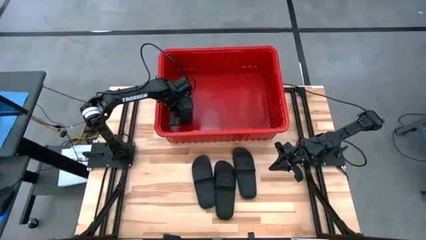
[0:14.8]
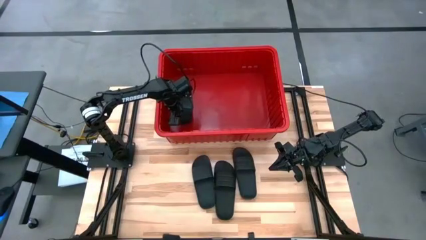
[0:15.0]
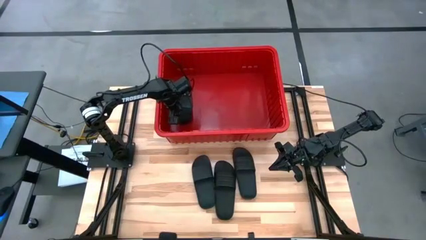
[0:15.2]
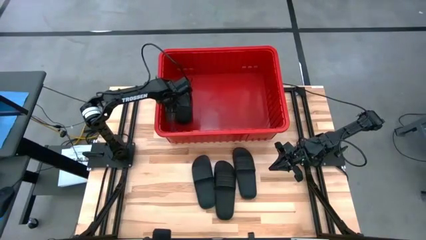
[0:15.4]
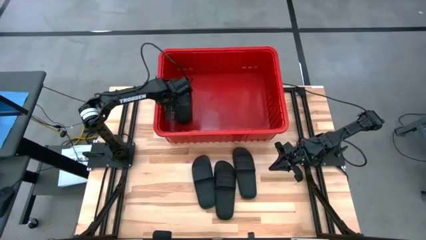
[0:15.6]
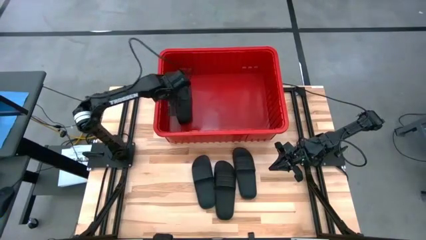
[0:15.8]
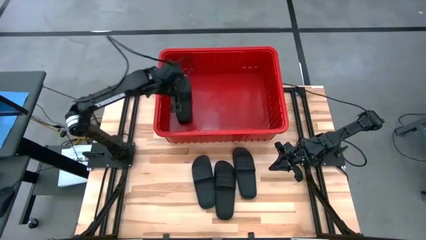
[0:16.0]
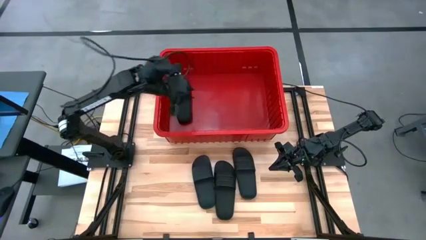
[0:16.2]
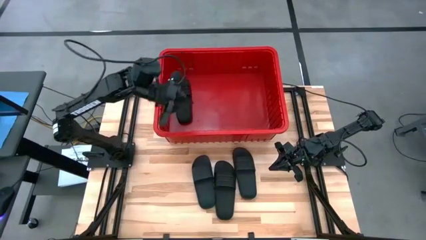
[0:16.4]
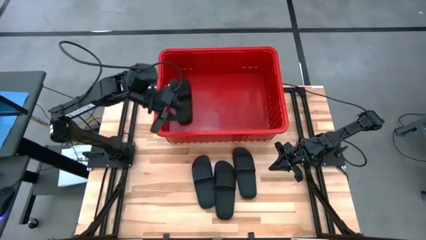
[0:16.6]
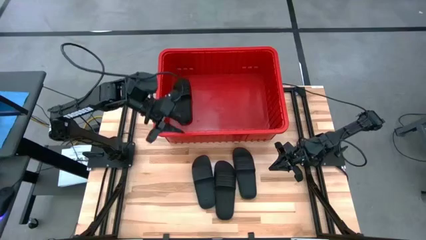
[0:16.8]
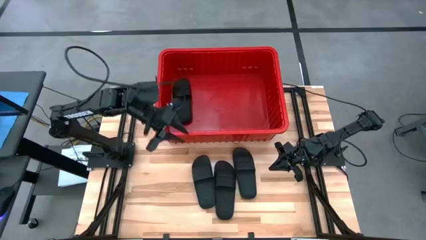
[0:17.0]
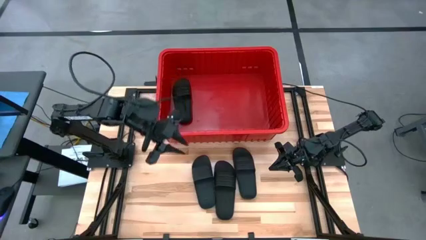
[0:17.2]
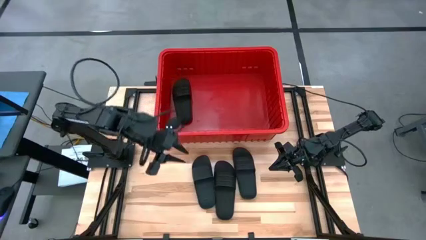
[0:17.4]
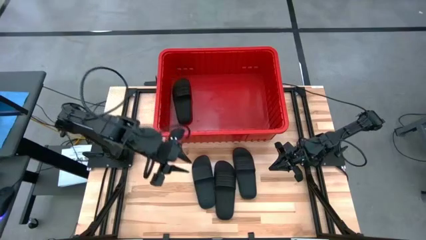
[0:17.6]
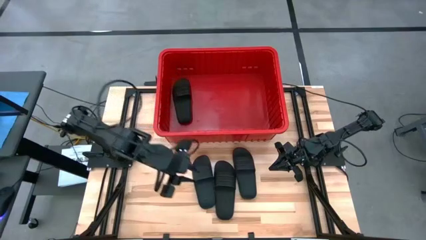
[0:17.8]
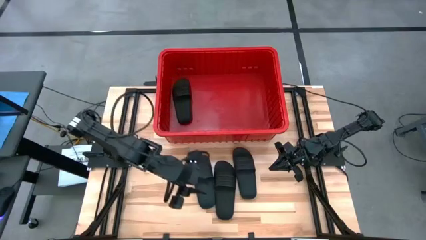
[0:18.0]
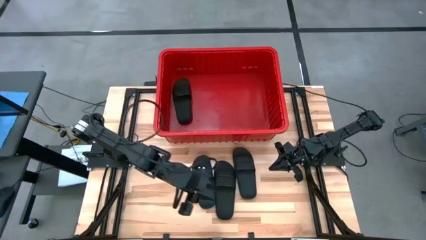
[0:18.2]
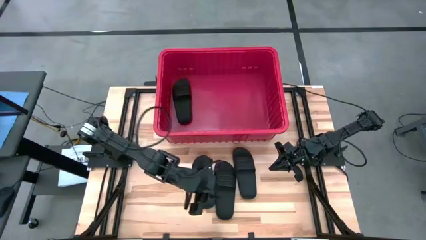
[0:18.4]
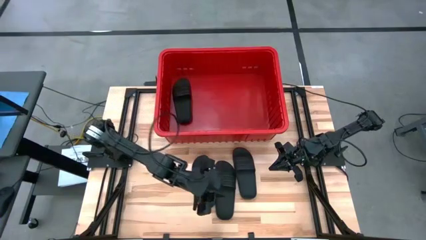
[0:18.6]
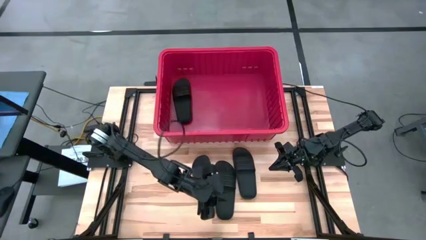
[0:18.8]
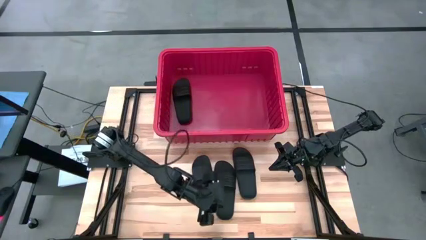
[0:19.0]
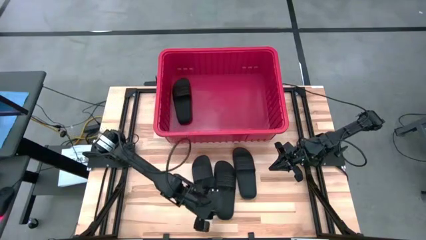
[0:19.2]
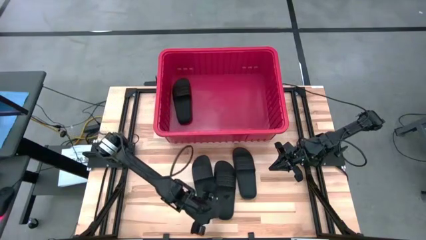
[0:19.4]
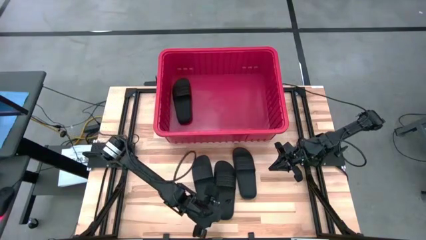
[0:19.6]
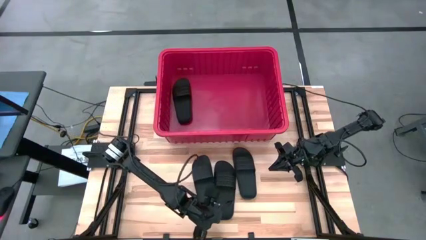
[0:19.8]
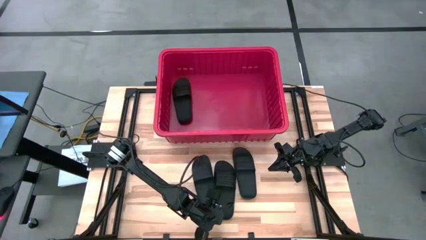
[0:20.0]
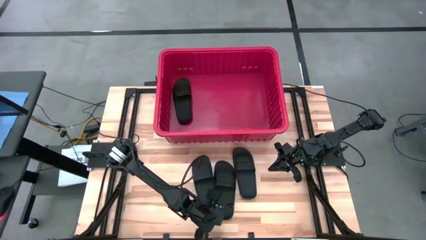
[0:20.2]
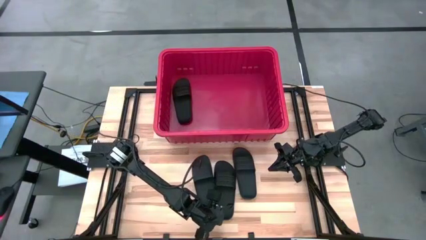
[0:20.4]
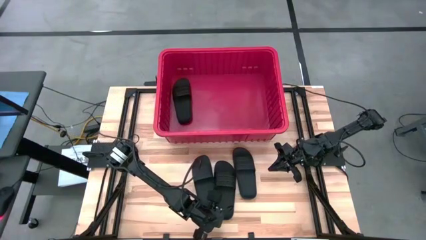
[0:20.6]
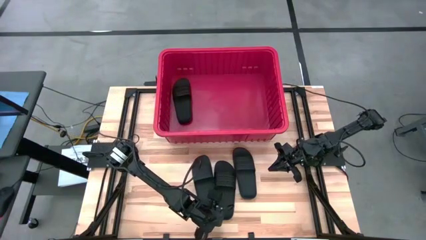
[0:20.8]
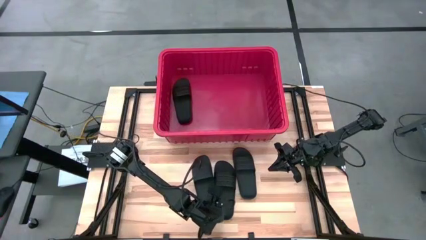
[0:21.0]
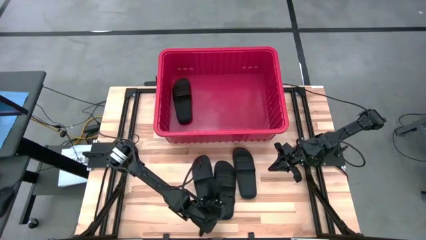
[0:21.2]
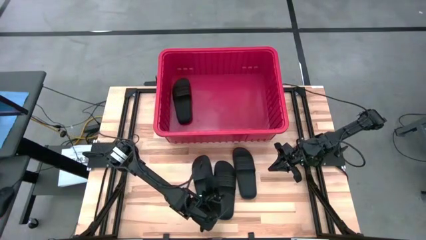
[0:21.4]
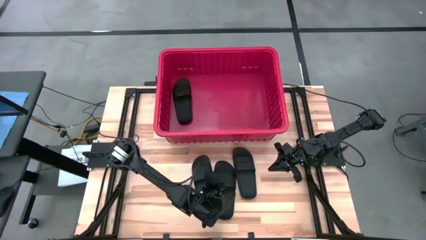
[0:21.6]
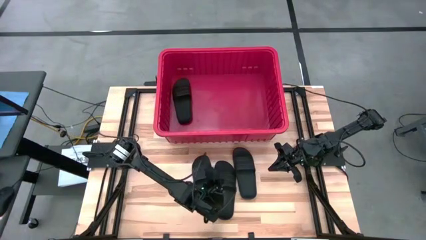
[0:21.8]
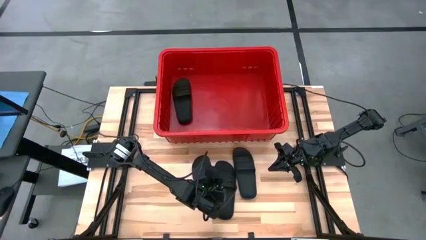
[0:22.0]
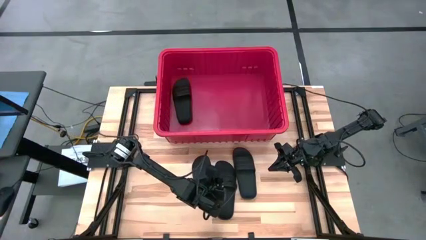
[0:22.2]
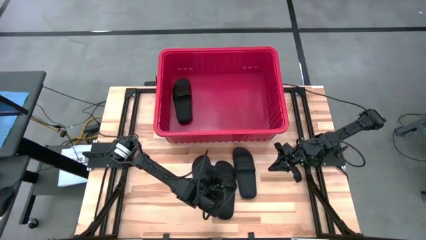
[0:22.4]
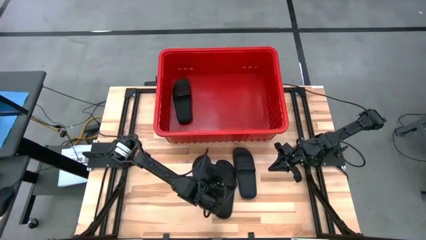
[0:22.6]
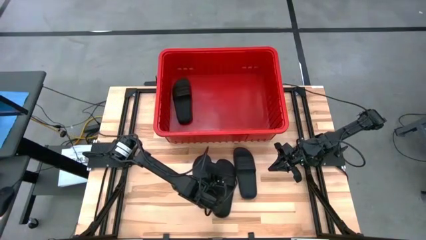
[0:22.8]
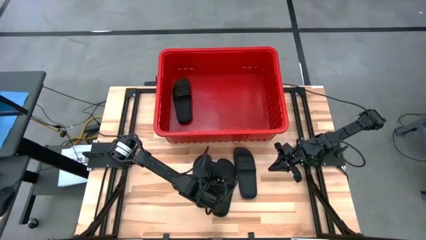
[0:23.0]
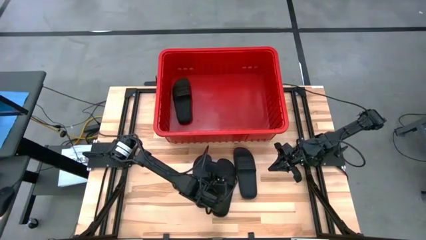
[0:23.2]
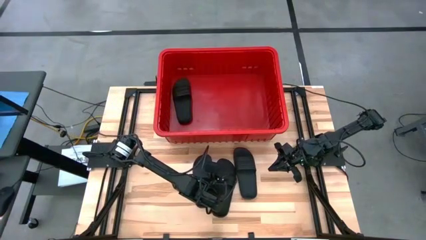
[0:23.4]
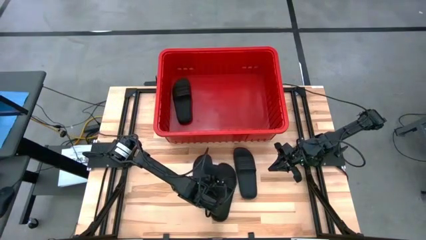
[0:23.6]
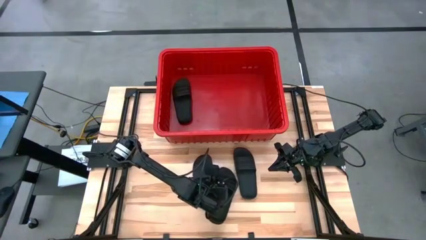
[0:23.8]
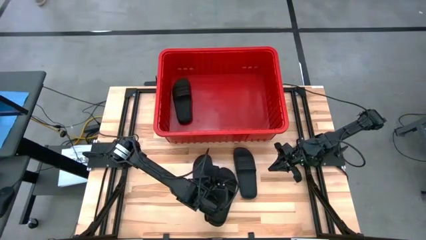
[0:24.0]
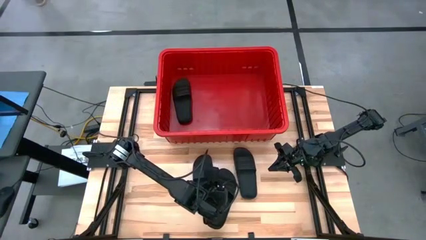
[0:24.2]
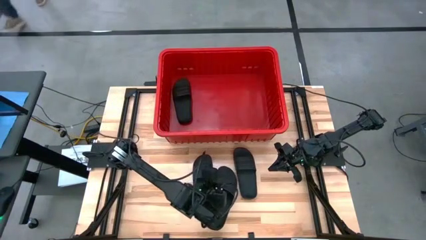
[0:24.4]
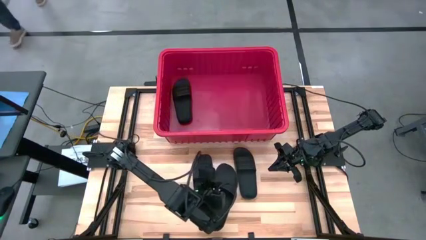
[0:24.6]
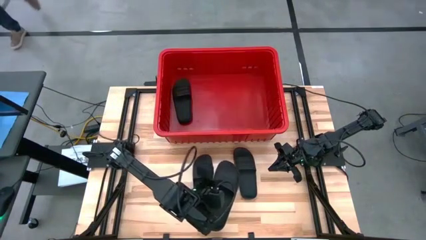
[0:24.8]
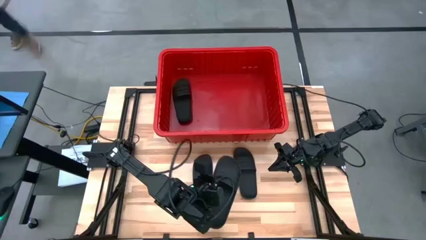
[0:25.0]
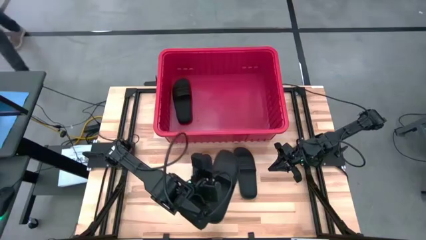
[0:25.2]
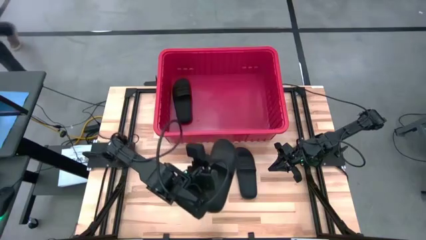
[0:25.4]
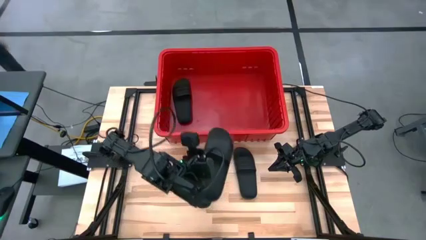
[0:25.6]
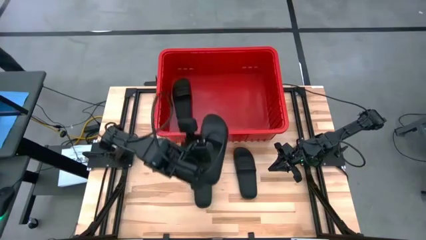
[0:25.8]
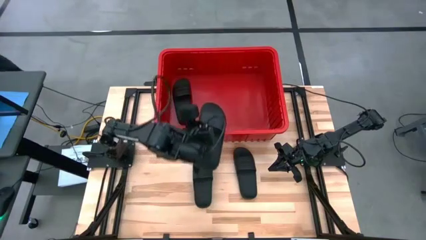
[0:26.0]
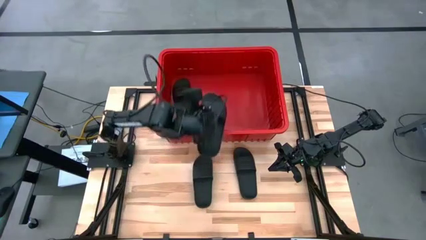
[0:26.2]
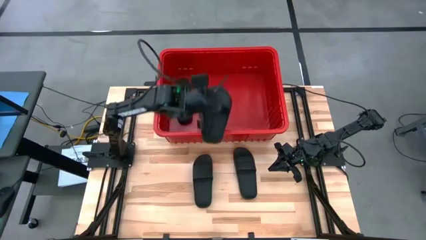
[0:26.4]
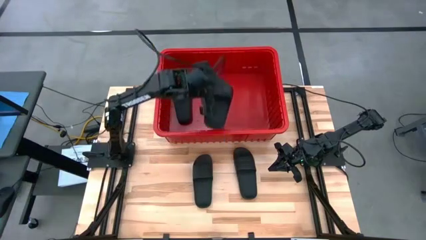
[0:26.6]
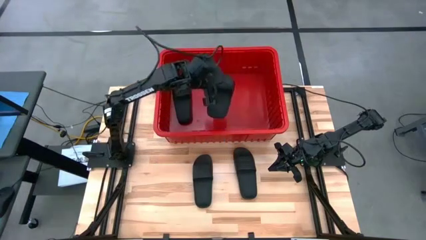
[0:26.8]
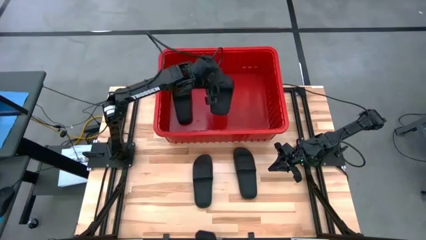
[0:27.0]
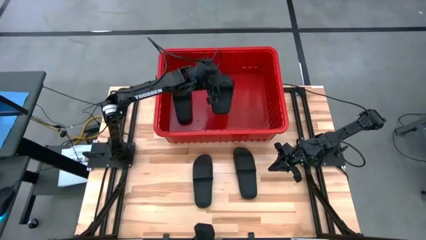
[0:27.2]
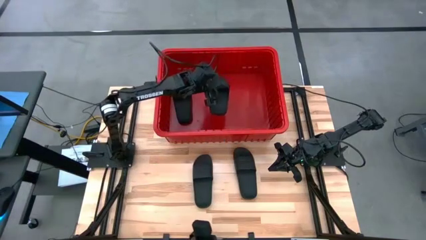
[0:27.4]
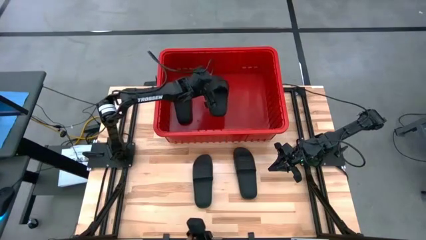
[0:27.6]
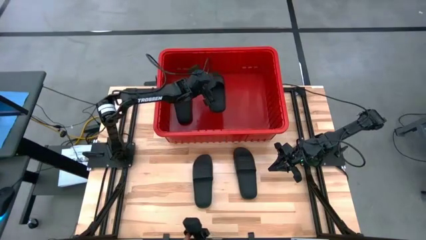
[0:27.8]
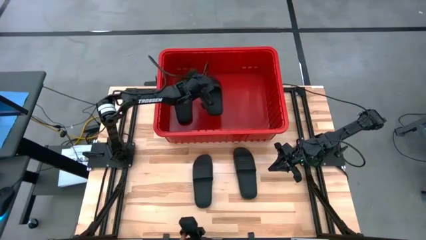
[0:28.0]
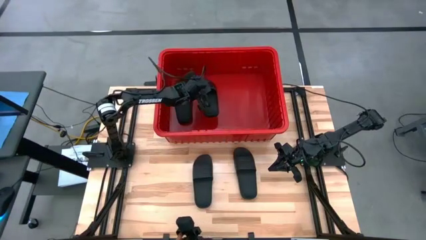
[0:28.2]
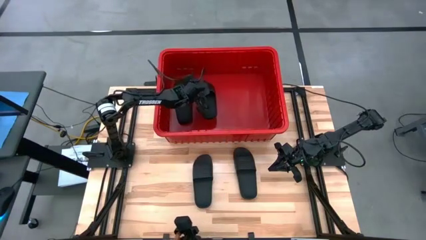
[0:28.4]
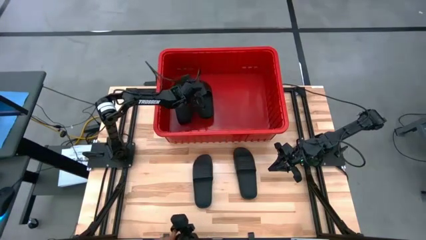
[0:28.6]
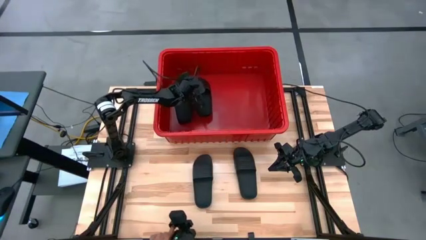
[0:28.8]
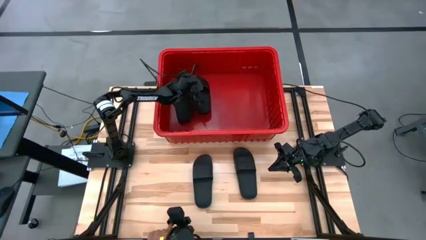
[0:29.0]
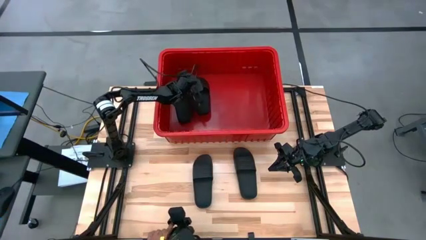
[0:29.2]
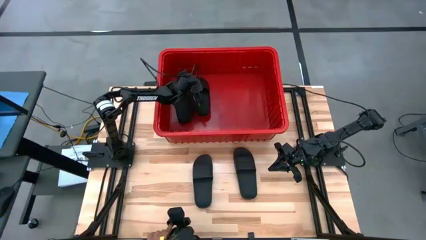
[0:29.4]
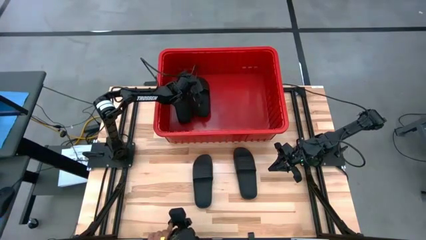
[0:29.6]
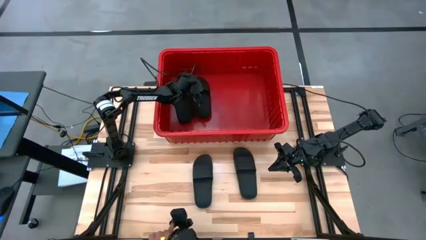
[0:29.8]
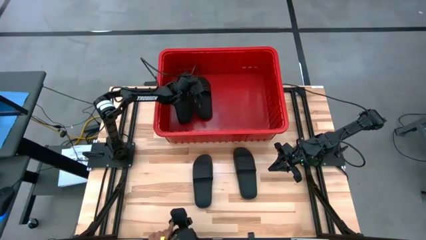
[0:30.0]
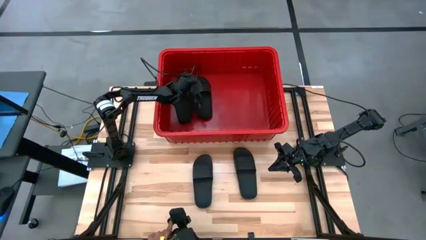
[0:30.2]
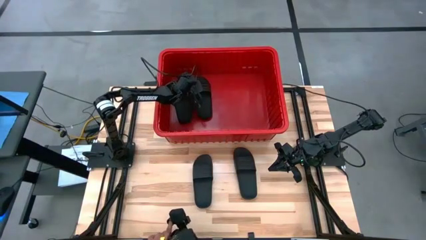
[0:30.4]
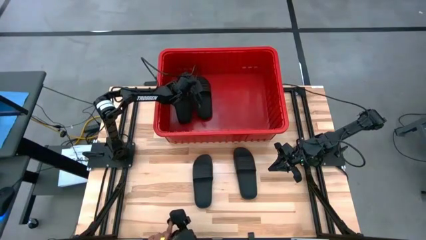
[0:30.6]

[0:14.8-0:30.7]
Task: Pick and place slides into bin
Put the black slipper into the red bin
